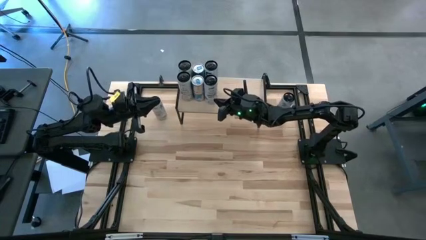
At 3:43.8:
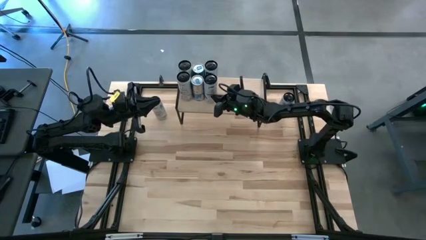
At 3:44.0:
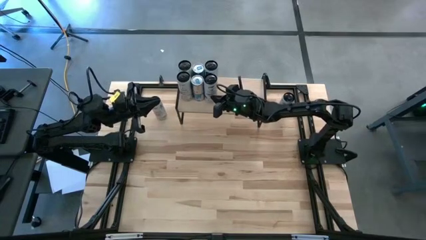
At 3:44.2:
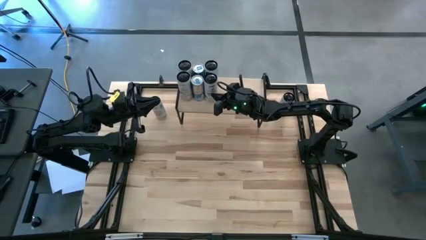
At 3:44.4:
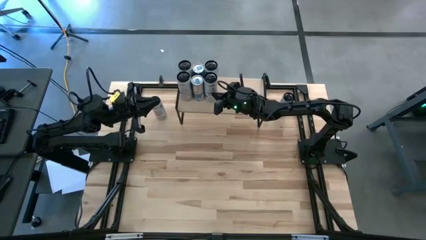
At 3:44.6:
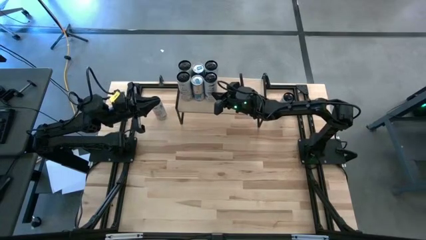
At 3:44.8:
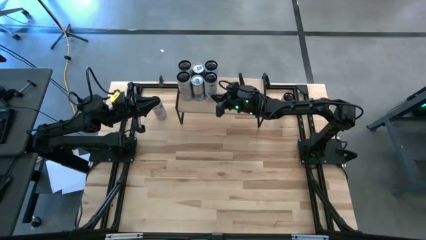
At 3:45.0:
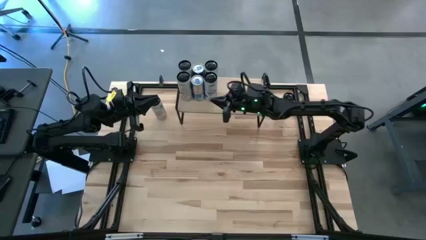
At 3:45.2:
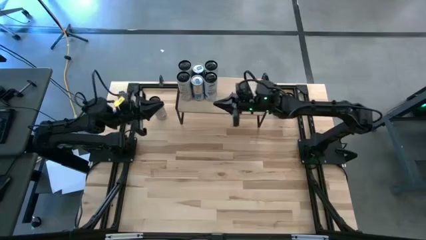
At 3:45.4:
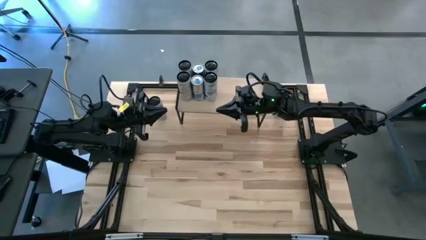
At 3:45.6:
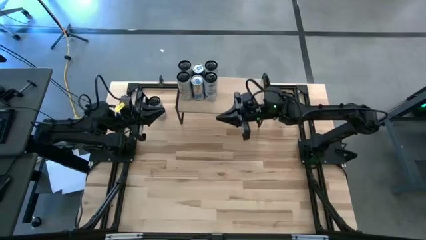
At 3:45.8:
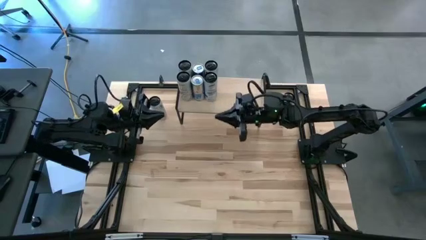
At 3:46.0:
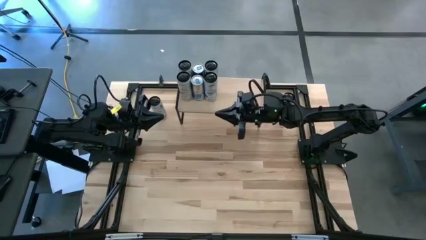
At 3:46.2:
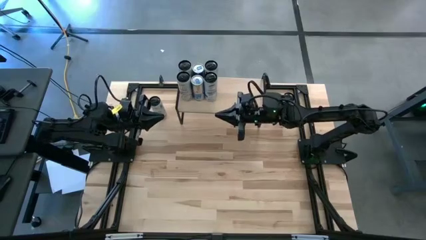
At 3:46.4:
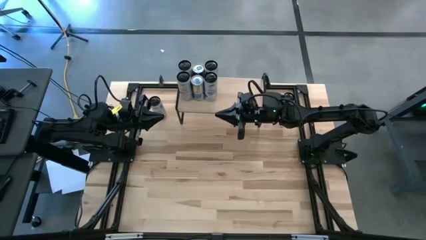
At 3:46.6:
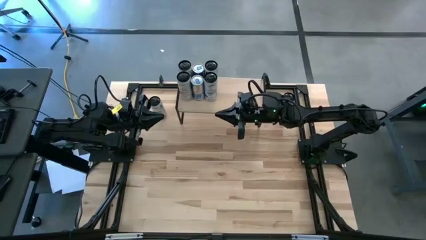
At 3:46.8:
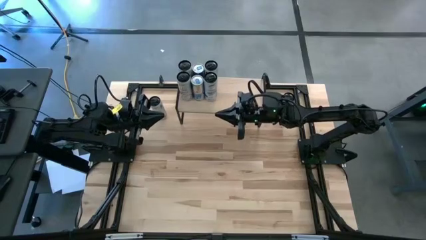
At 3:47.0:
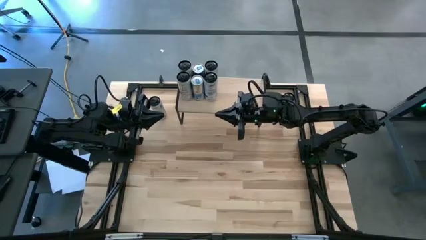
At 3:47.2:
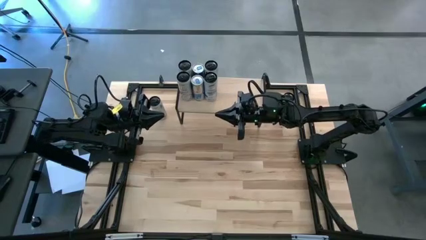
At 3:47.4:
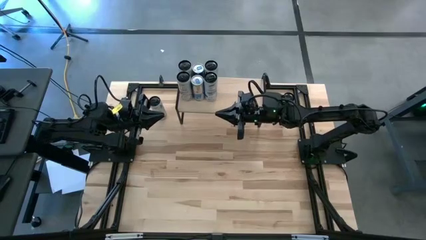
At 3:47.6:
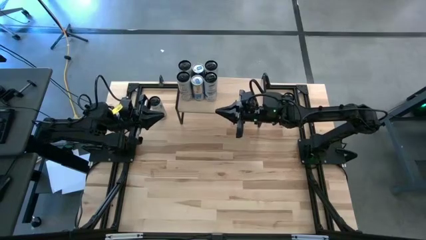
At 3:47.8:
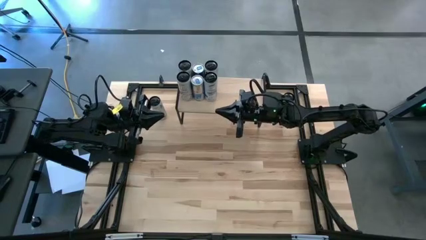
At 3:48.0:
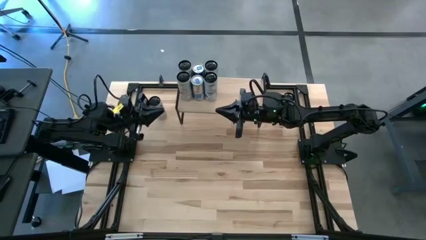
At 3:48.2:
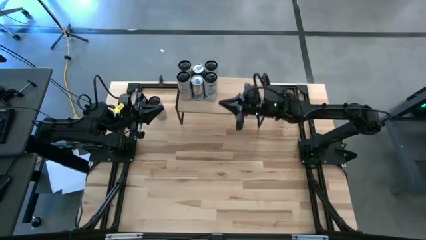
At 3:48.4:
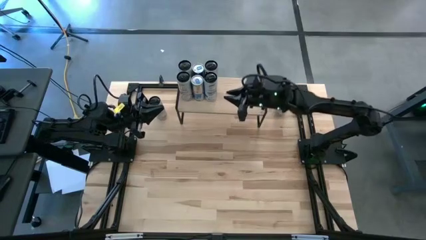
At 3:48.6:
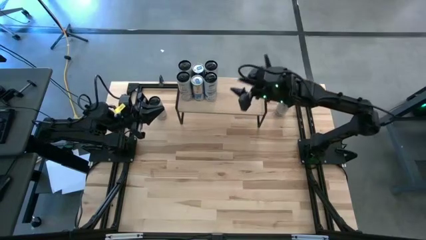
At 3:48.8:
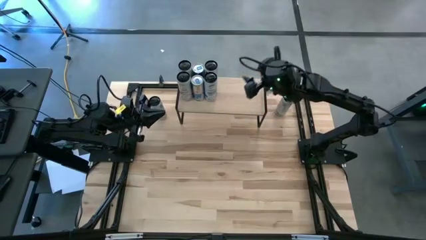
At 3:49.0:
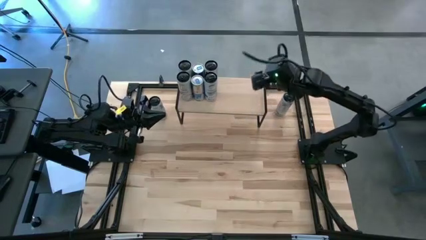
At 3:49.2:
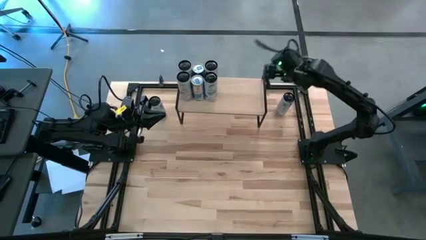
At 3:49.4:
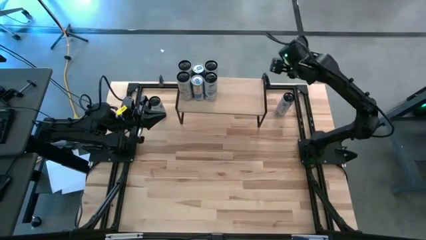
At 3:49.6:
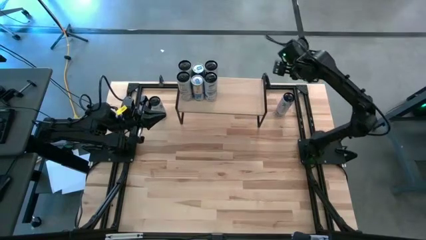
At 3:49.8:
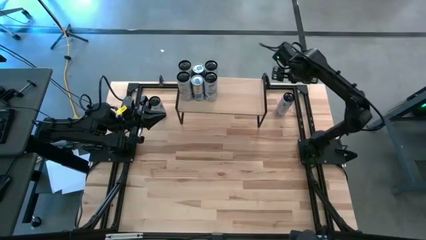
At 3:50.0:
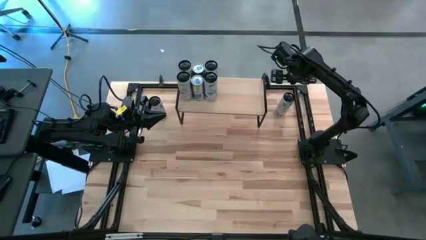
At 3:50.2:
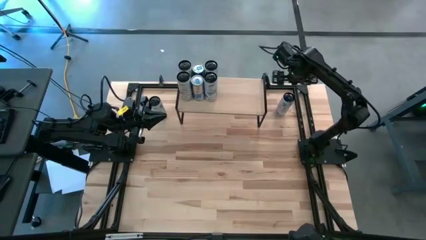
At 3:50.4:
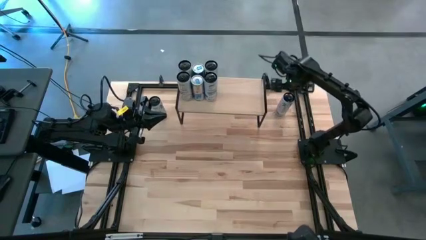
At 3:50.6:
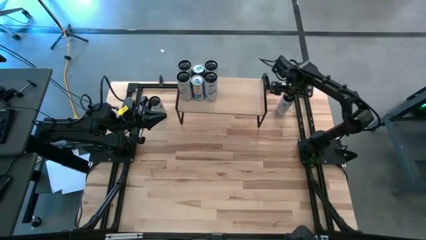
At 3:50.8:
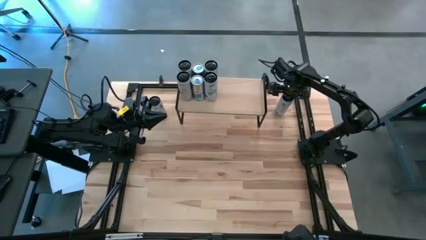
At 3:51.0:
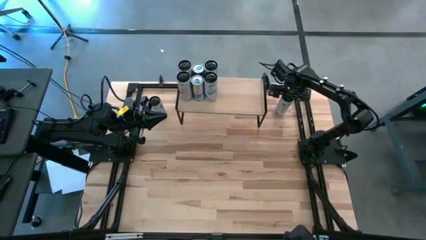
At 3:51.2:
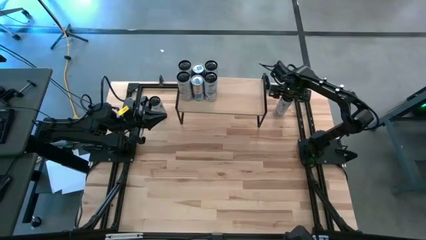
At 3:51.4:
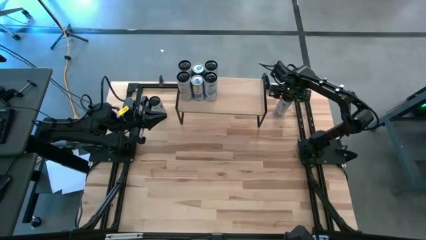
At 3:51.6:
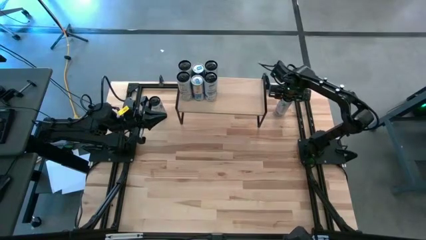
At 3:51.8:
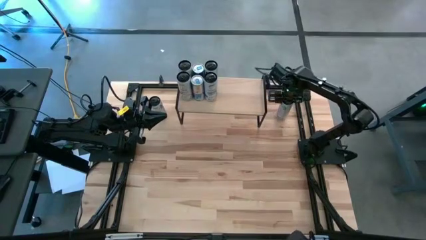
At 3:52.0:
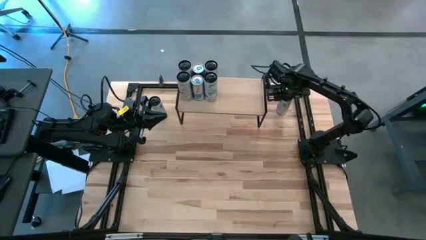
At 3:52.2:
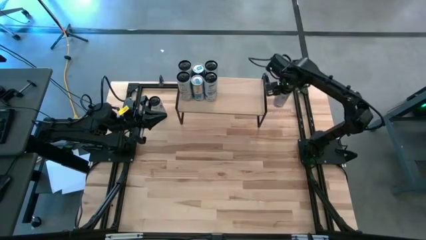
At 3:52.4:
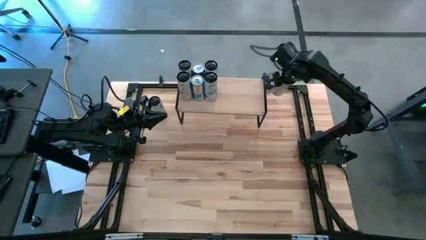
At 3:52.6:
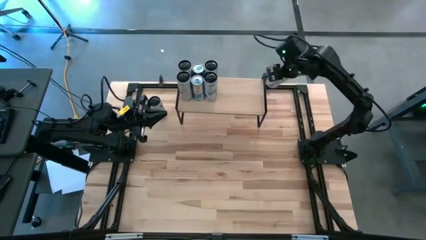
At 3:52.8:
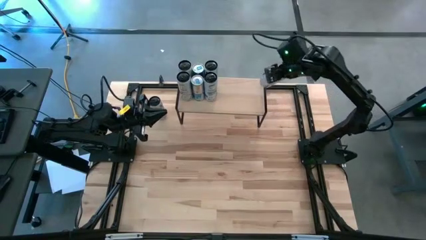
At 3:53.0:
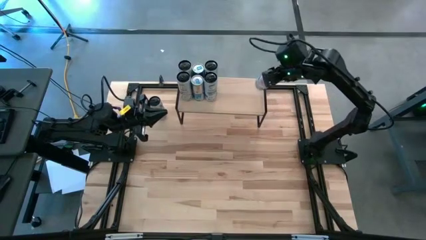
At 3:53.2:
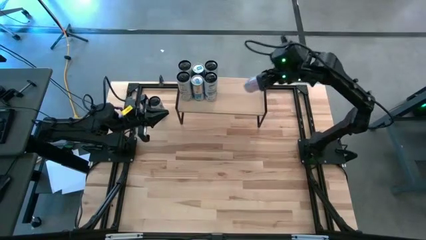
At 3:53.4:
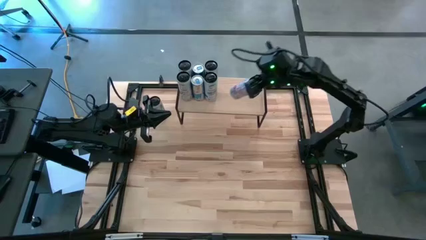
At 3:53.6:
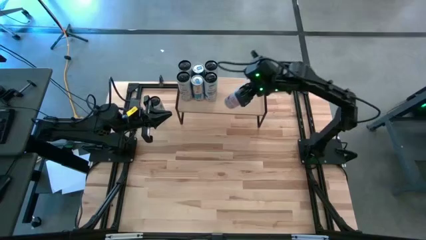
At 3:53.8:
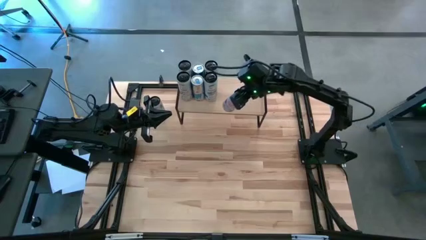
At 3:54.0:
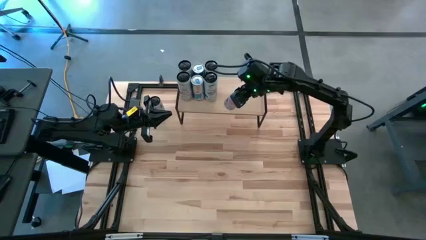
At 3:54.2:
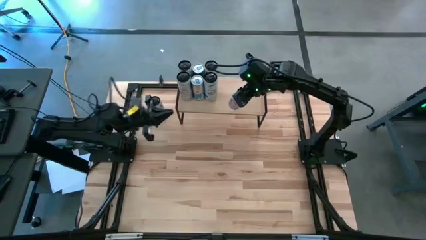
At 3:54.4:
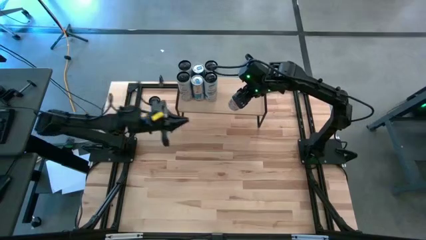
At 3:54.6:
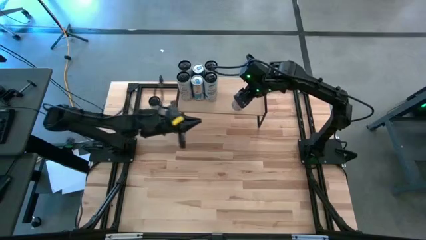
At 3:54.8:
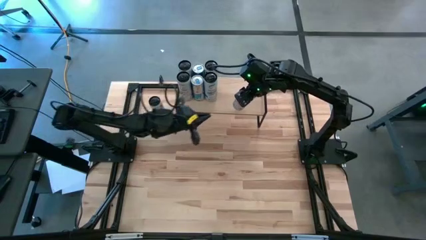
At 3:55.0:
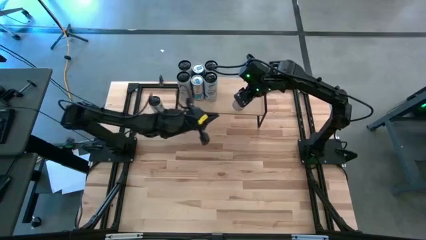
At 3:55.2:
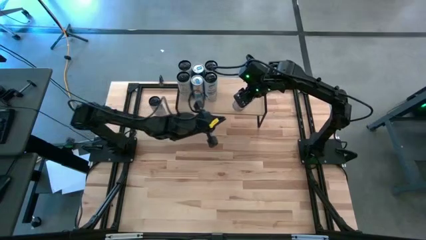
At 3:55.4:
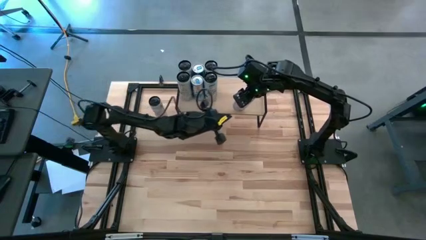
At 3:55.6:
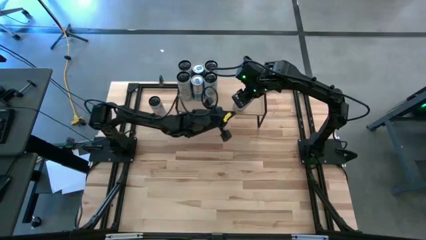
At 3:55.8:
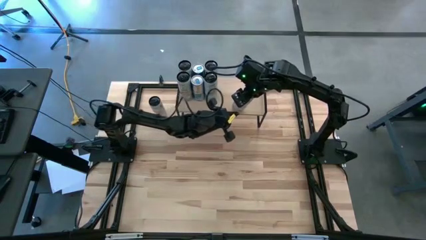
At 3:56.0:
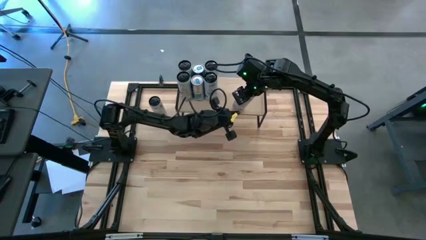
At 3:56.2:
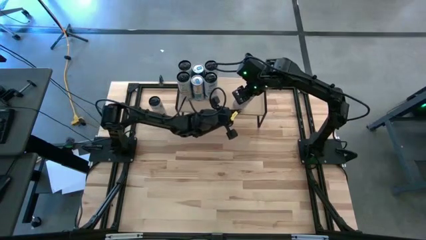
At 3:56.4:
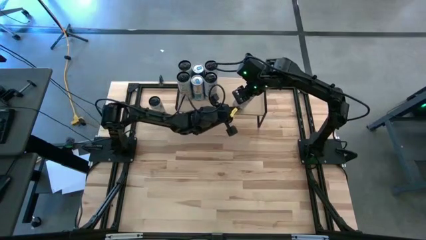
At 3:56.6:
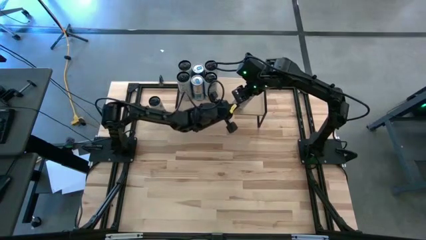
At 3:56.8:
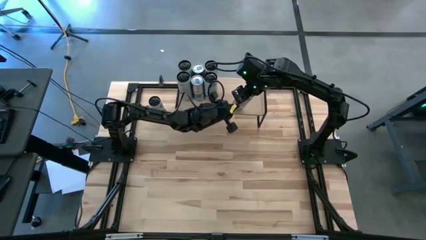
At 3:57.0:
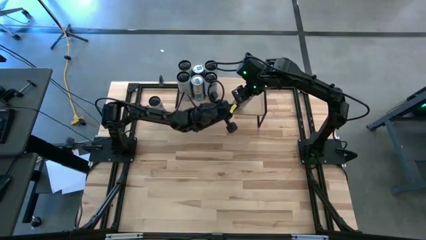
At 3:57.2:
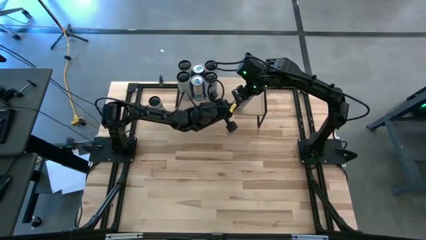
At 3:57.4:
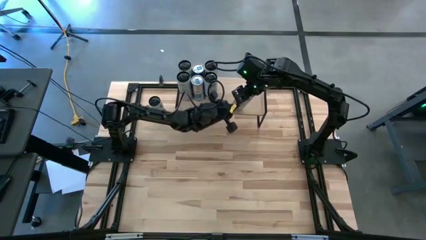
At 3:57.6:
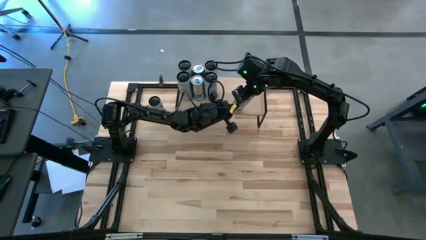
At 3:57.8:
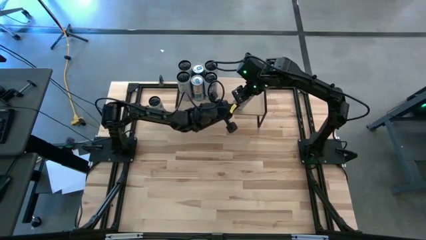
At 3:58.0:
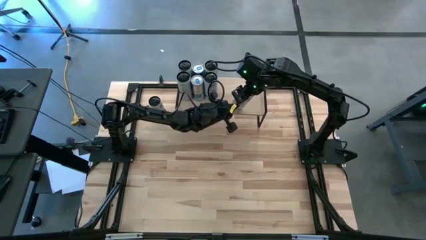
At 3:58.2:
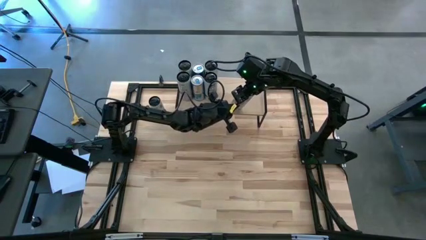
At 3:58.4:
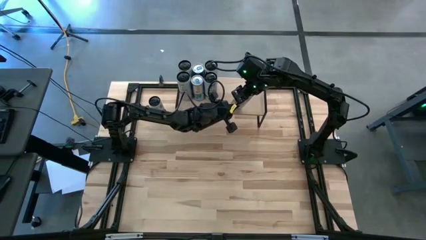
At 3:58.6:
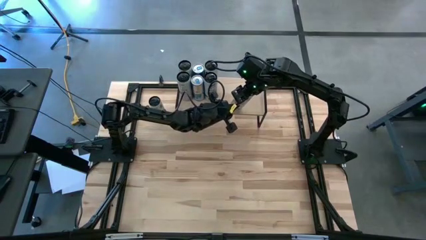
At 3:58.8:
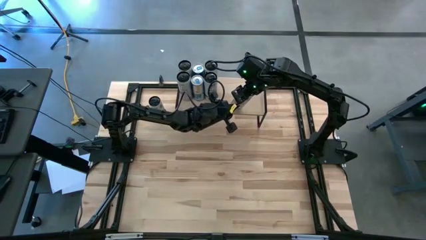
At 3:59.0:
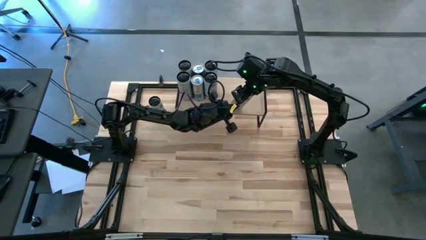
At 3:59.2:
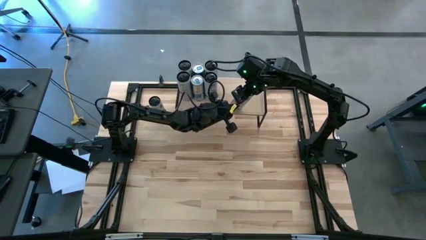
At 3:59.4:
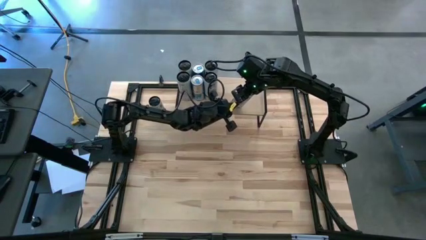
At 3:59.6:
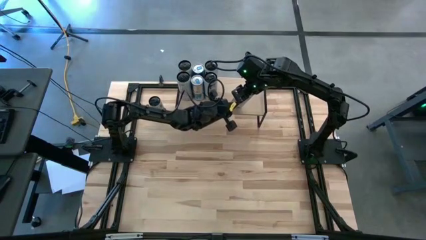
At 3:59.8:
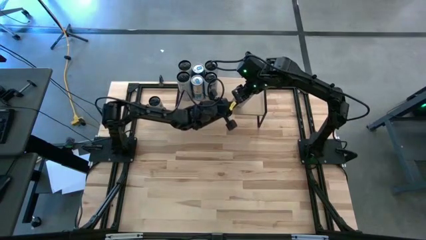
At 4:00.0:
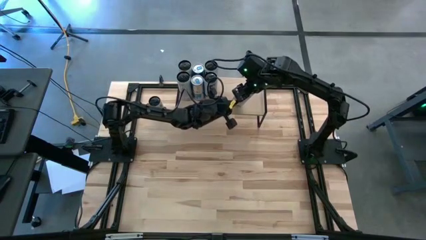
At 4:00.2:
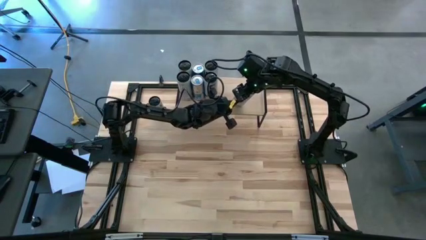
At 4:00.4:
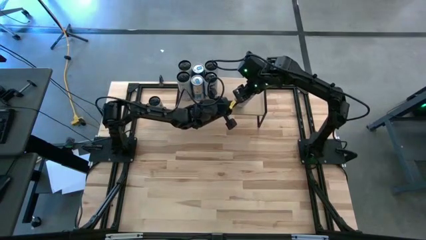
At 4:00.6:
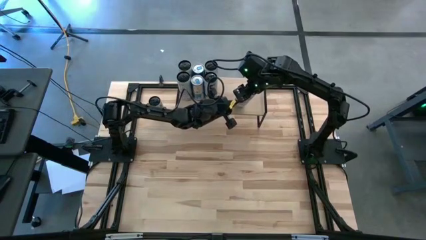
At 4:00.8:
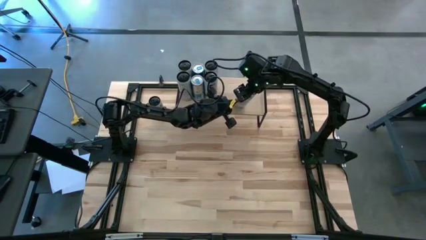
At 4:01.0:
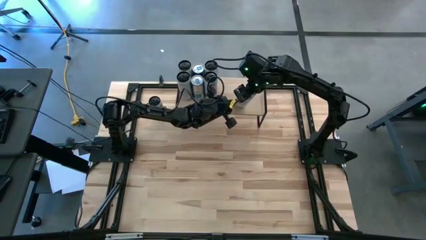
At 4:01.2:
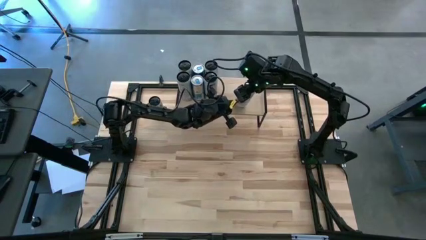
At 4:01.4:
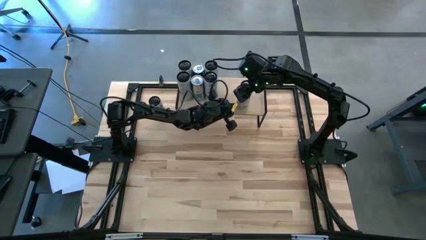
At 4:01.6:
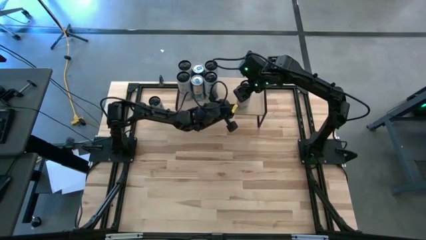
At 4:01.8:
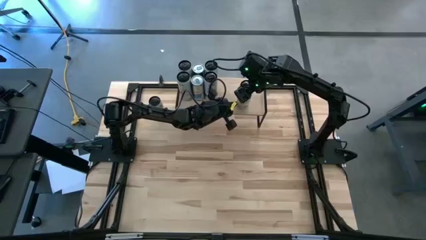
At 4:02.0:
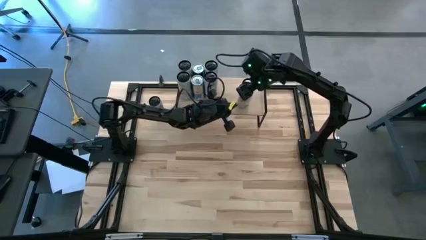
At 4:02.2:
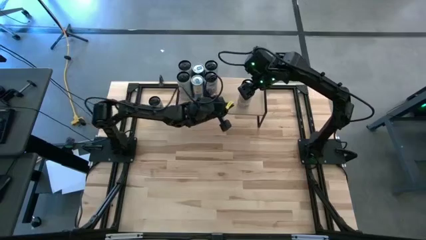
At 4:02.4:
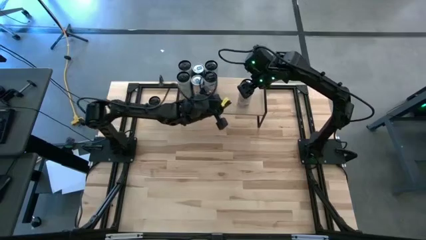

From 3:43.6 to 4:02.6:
Task: Place canned beverage on shelf
Put the right black soda can on the shelf
